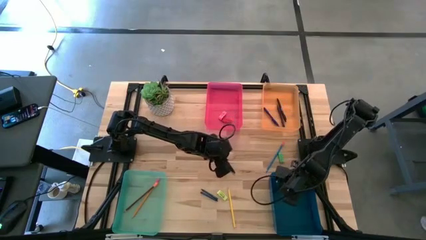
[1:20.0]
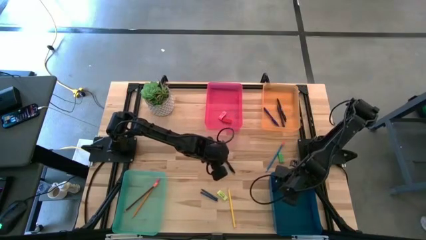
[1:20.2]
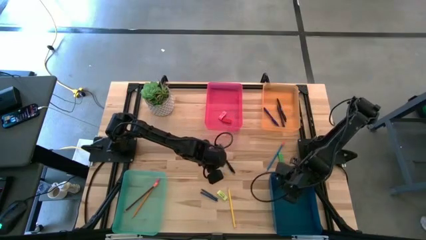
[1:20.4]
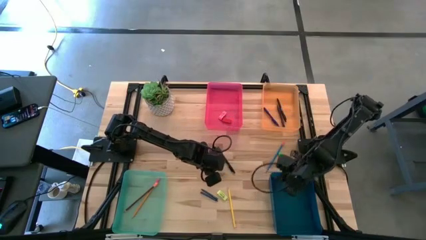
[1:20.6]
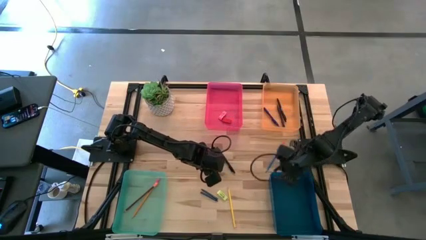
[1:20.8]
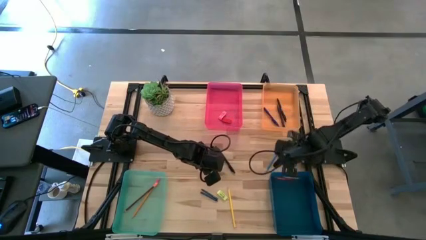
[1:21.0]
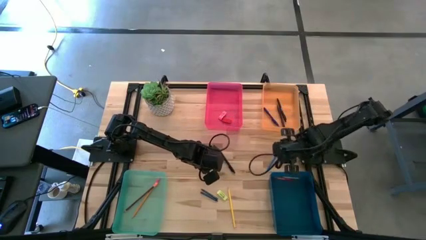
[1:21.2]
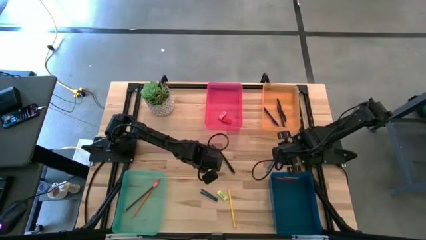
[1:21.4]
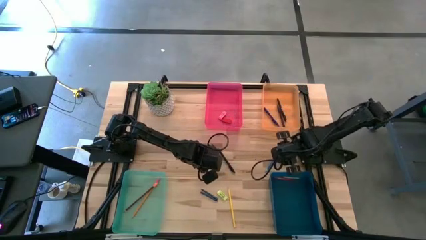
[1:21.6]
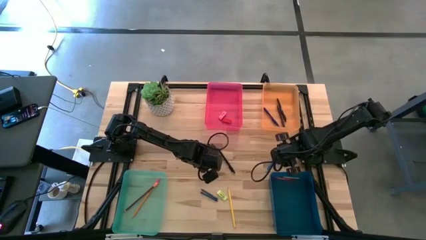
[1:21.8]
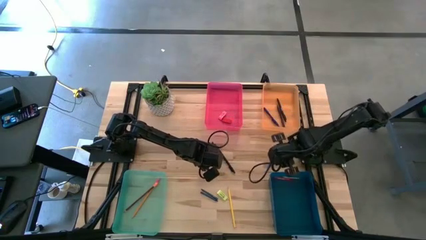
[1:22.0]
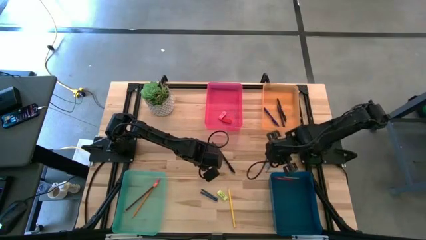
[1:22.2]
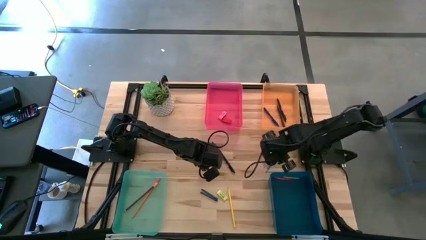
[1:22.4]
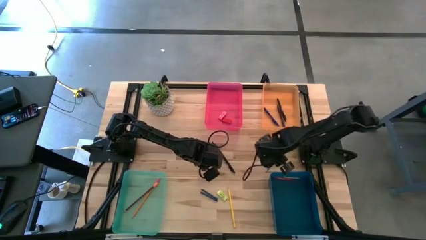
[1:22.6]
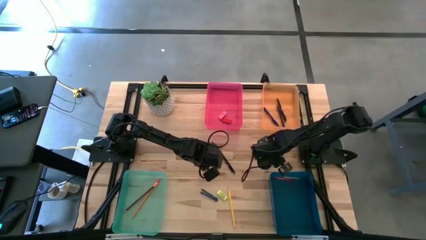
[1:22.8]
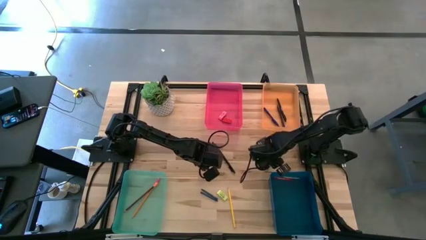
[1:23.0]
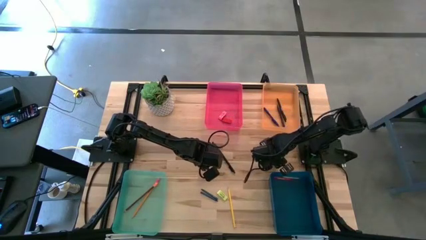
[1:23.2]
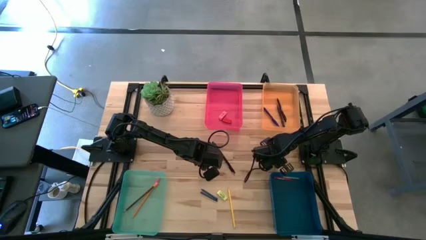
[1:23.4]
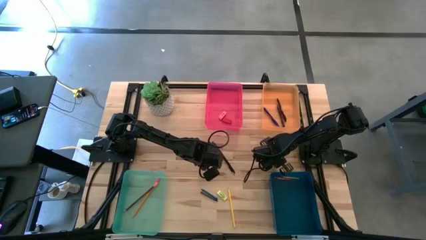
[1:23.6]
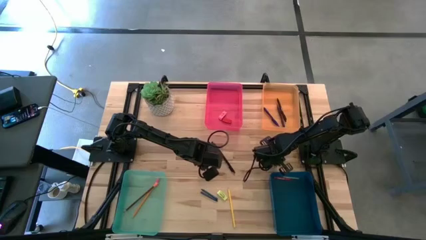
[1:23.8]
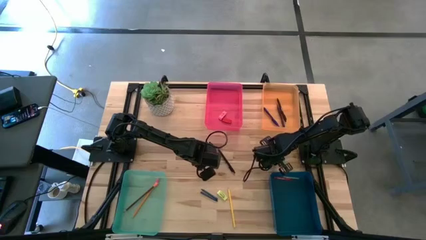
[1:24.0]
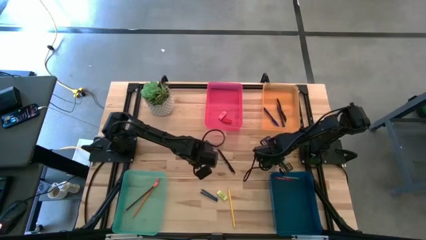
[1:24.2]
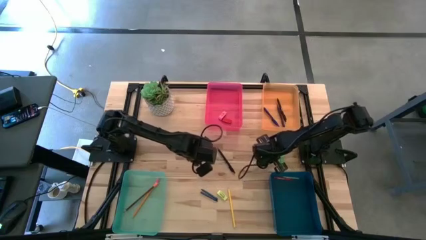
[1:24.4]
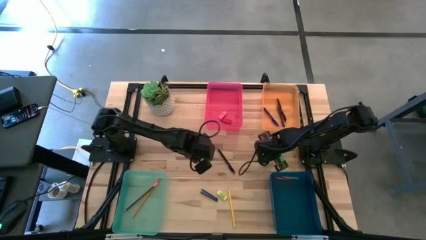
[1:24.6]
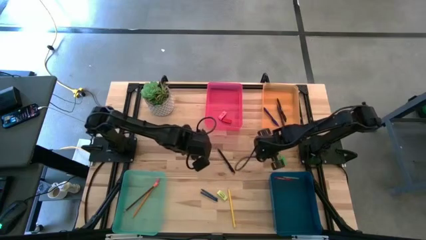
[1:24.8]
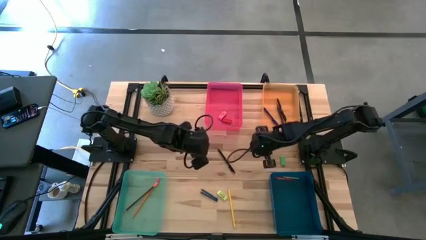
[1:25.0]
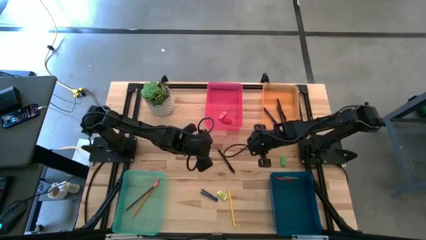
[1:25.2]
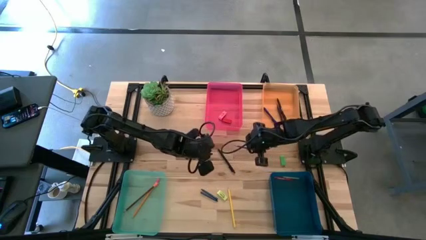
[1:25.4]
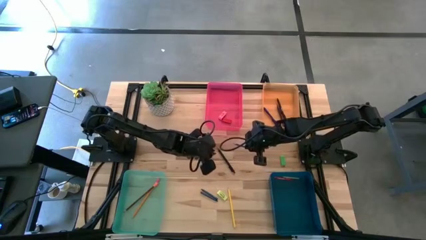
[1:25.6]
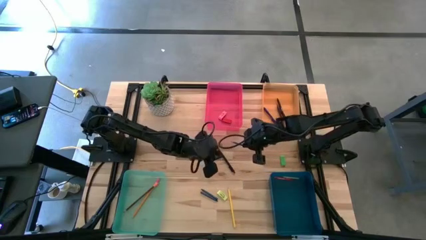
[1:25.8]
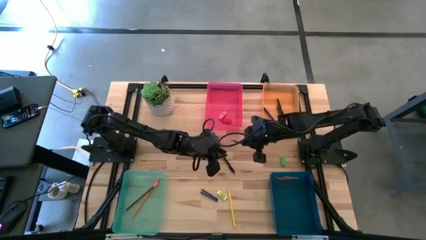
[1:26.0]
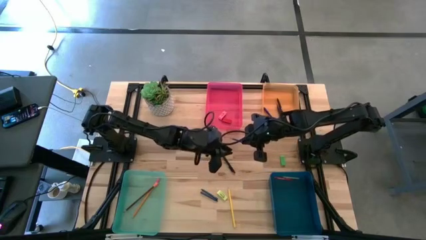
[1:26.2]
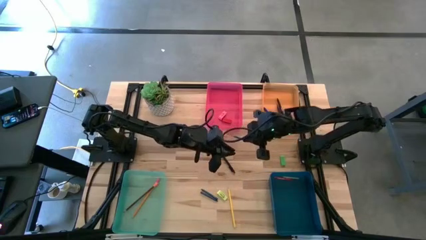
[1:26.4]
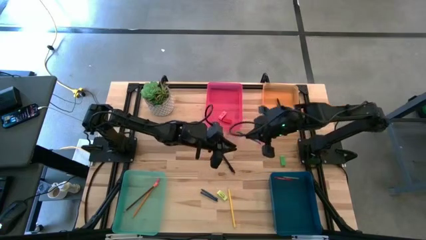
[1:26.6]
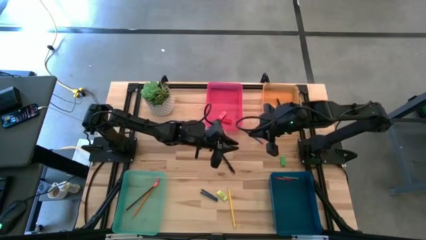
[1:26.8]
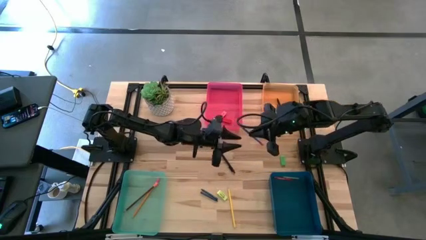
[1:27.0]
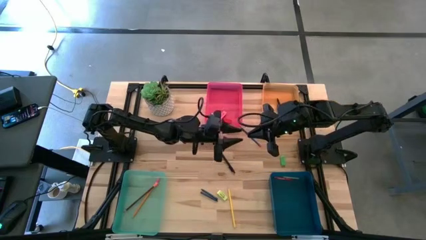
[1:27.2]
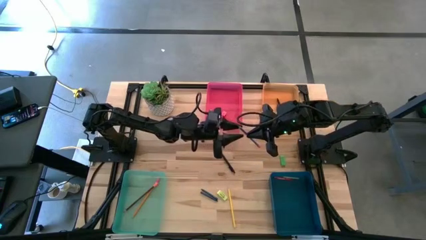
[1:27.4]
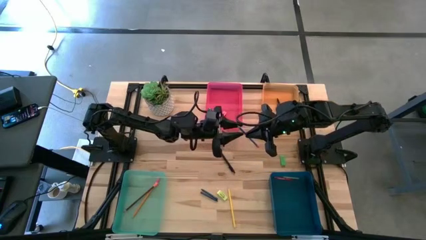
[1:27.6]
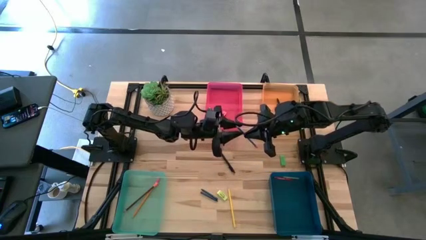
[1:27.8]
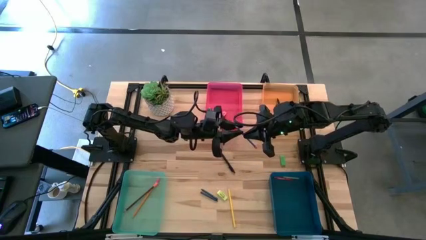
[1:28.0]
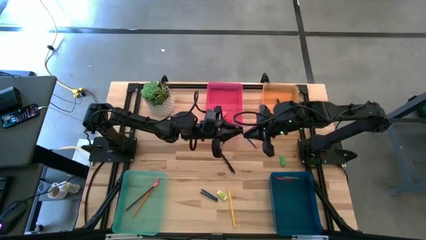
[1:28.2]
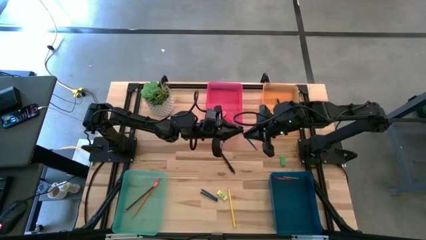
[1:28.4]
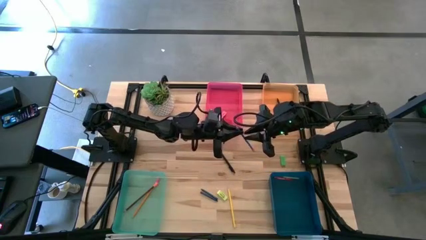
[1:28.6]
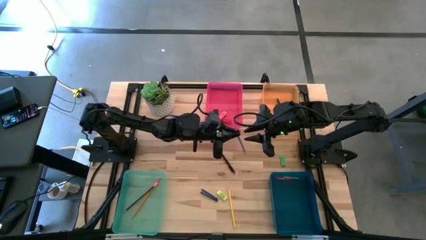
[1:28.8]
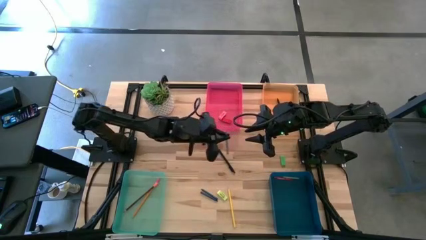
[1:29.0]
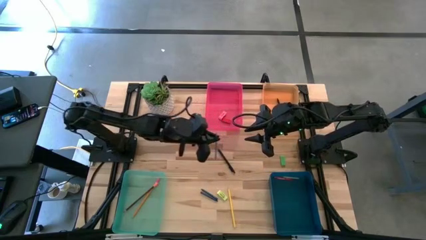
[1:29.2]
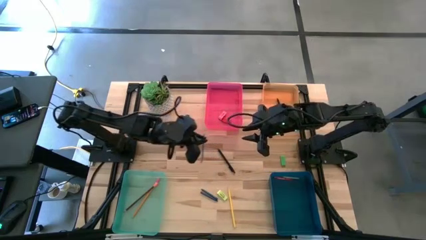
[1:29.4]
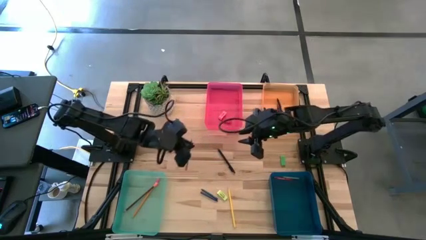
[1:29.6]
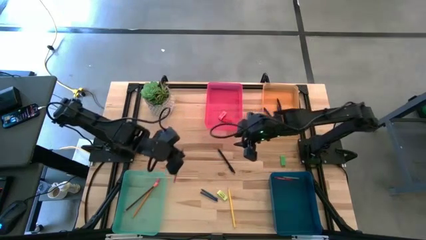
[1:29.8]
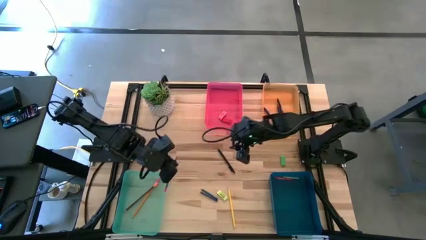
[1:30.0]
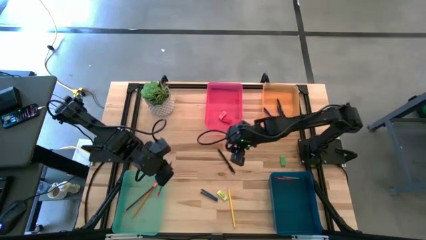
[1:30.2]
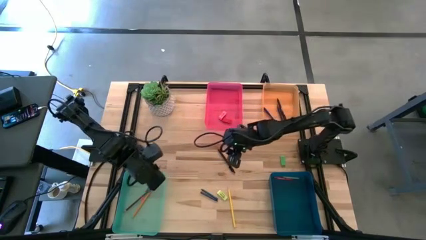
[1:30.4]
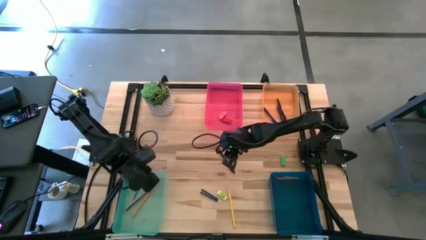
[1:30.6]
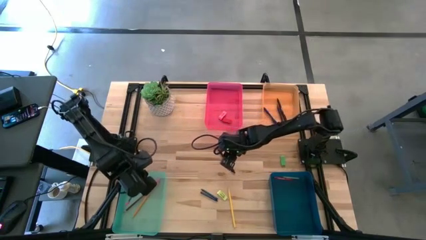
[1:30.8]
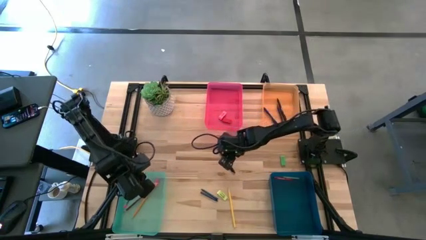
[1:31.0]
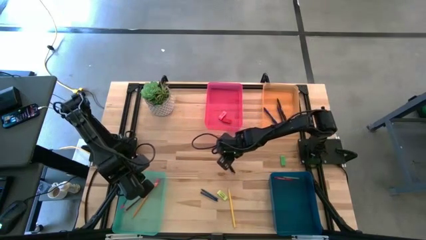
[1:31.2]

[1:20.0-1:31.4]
Task: Sort crayons/erasers/pens/pencils in bins
Put the blue pencil into the green bin bin

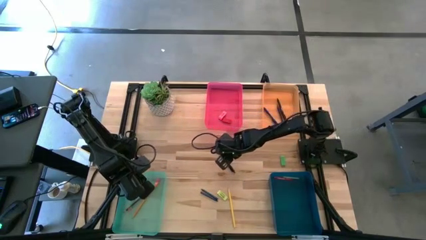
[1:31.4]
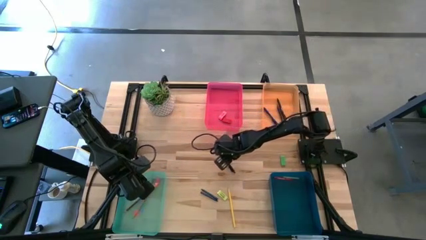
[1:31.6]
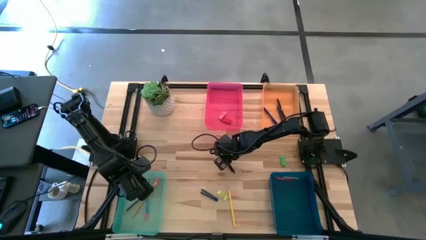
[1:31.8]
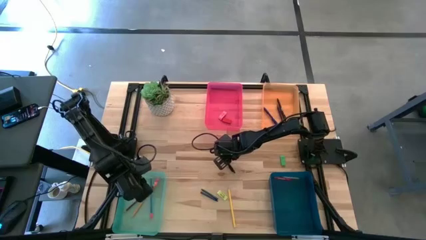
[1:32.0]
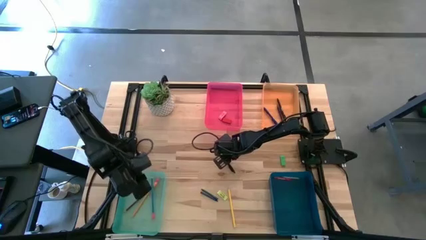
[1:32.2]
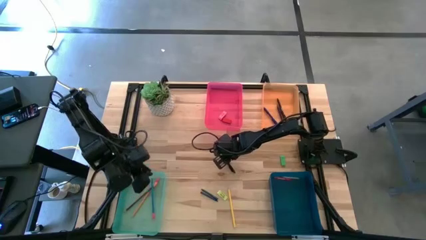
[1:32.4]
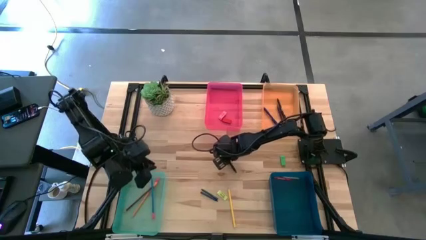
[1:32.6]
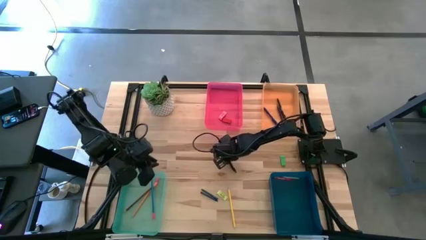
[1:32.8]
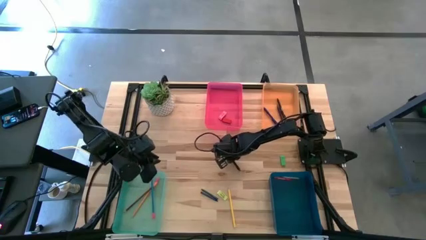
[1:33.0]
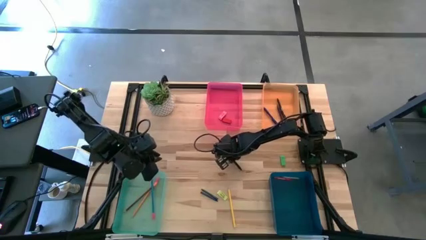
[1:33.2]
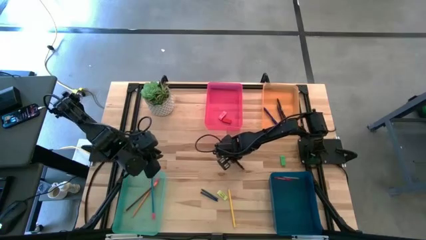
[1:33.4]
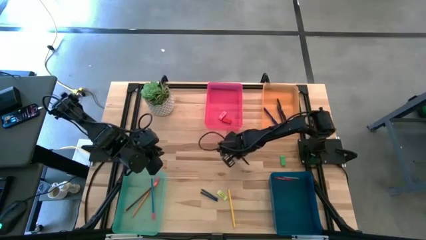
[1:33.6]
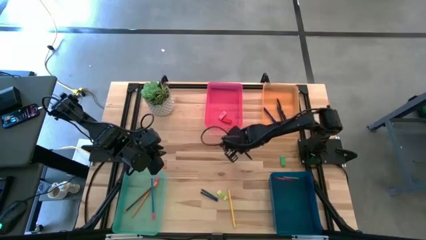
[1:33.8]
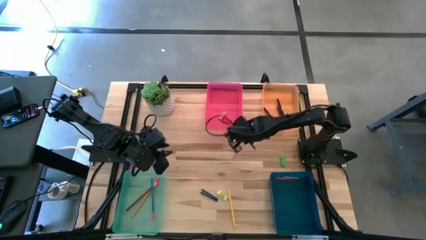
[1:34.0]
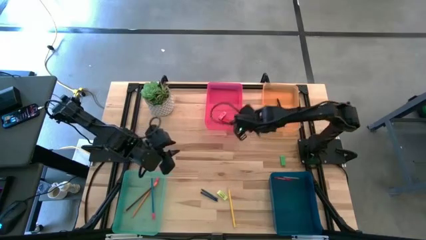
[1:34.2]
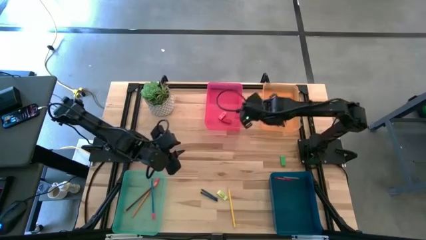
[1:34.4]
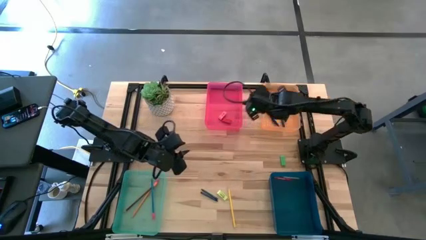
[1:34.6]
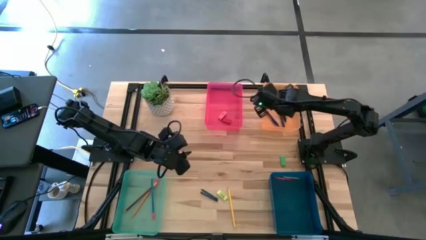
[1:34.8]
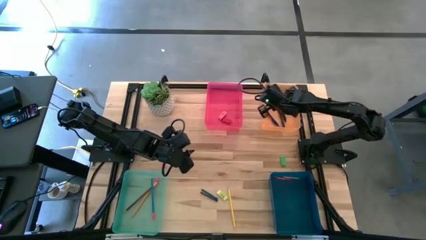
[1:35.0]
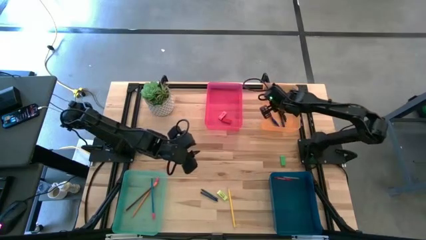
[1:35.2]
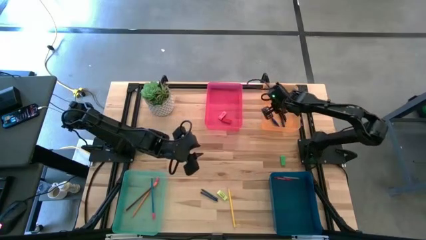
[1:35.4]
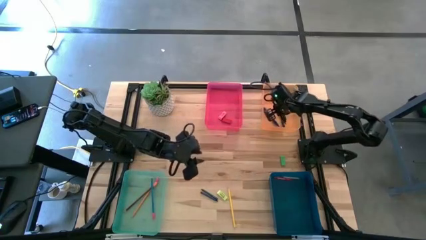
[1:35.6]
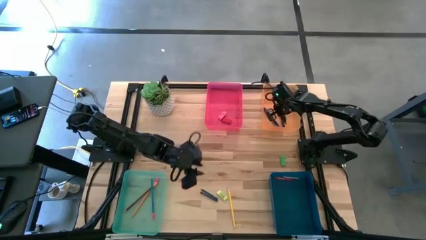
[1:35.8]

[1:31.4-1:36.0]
Put the black pen into the orange bin
